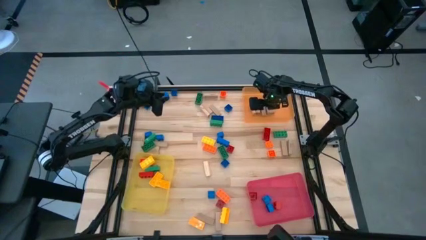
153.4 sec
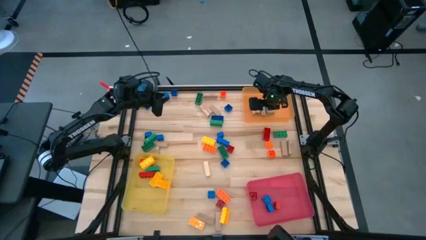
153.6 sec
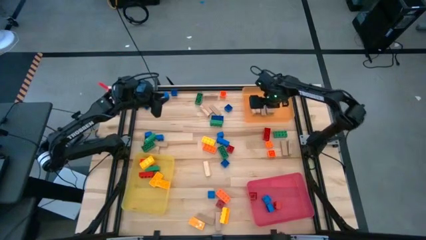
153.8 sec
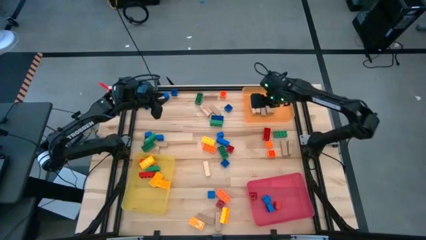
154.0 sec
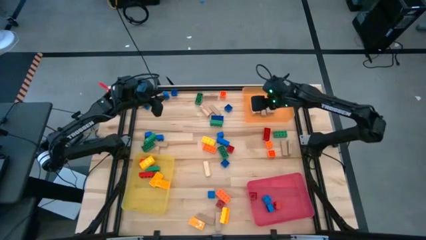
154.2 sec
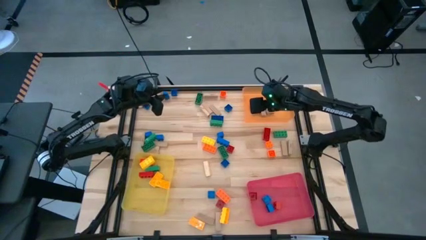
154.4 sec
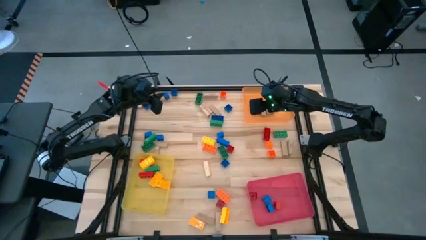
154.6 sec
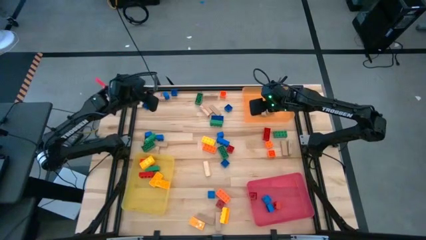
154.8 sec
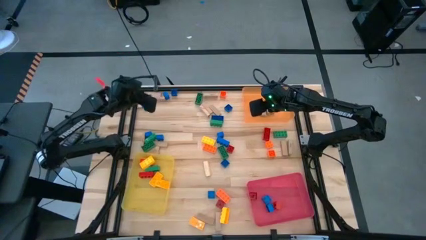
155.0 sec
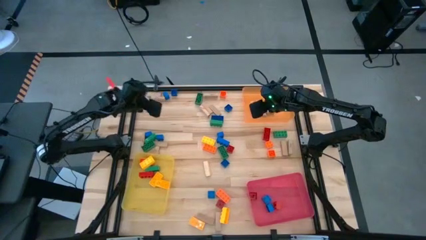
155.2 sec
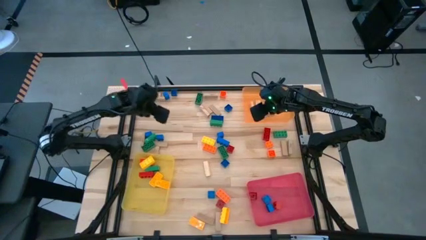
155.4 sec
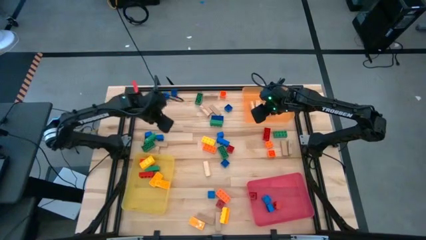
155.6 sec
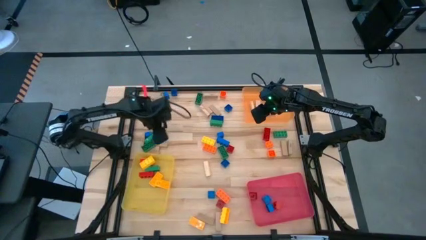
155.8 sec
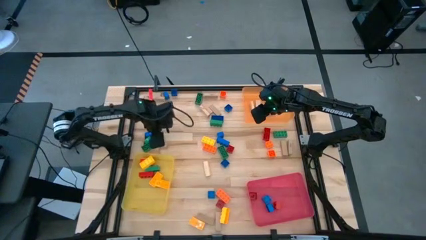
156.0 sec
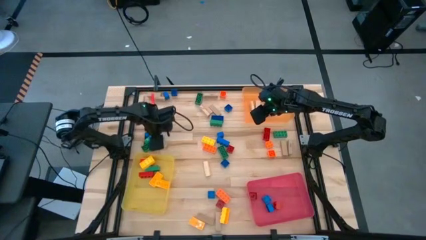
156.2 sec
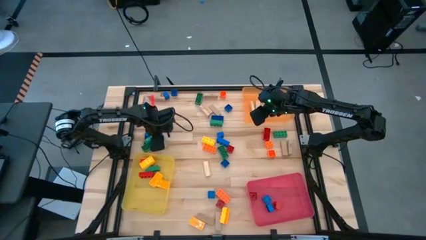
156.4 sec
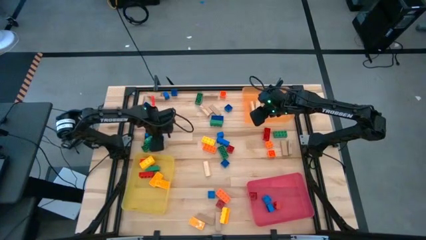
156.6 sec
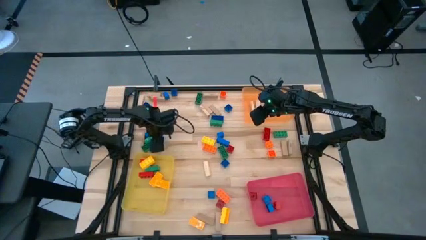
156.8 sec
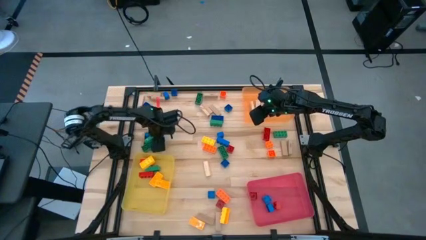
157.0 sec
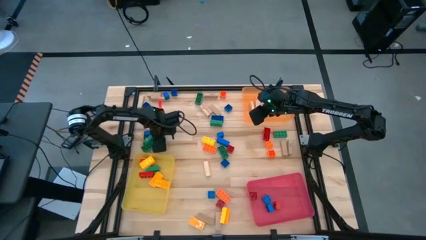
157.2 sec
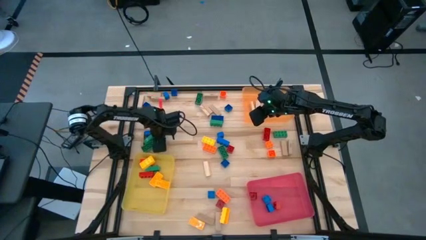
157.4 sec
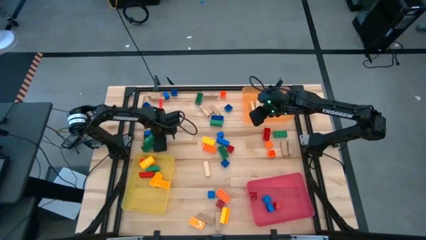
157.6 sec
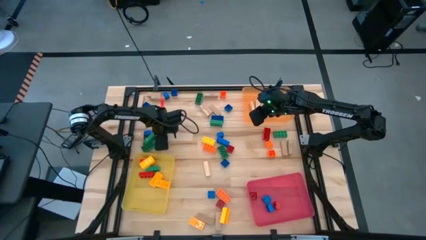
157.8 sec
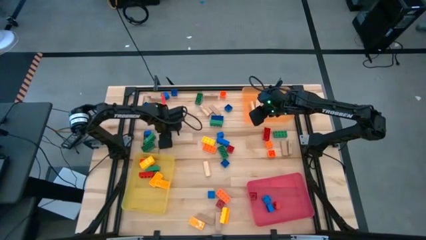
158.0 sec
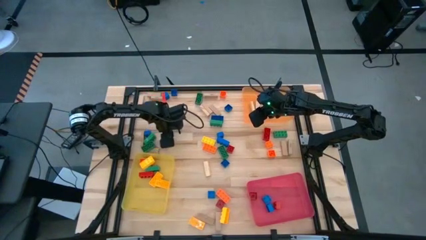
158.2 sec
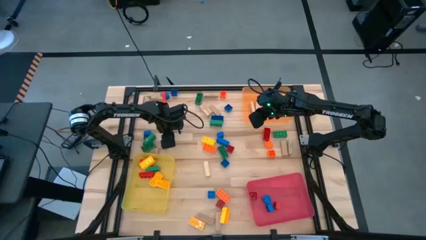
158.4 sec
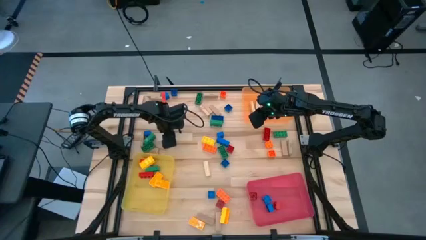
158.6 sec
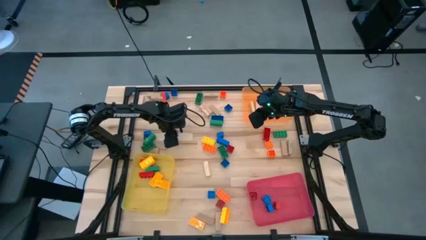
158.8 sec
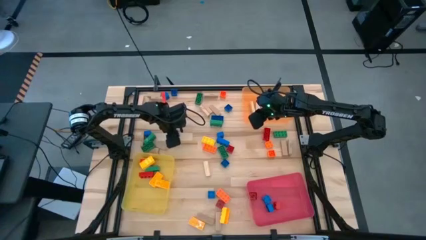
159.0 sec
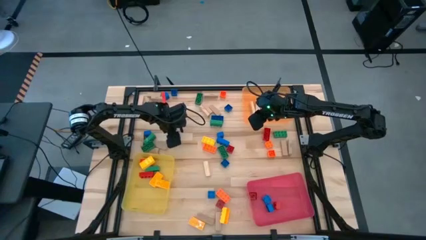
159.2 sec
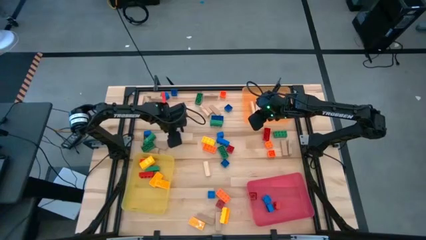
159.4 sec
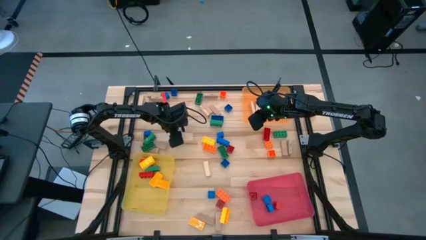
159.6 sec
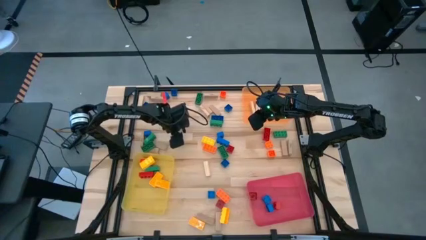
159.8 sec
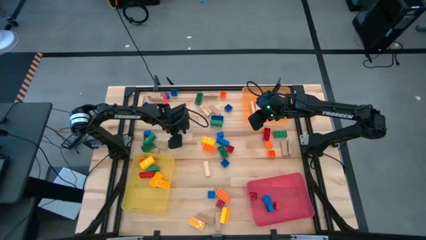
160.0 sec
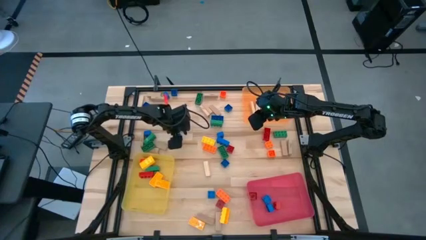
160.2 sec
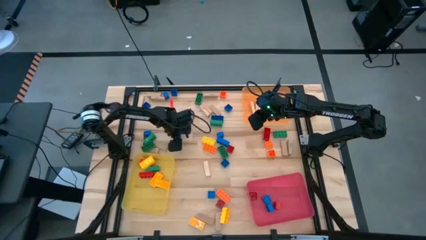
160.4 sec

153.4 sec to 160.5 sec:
Task: Sort blocks by size
Put the small blue game piece into the red bin

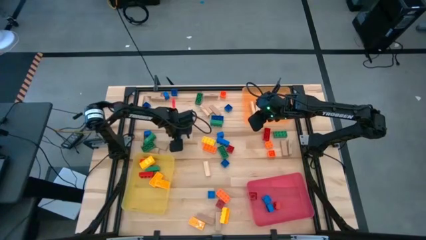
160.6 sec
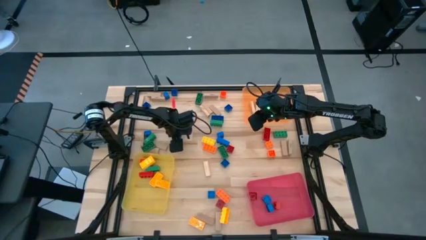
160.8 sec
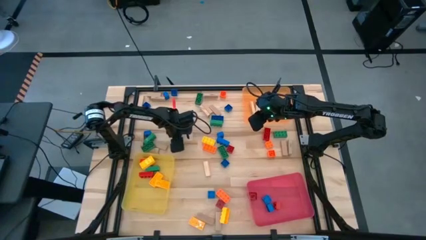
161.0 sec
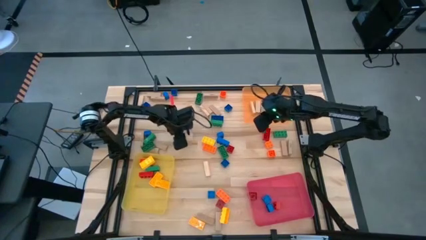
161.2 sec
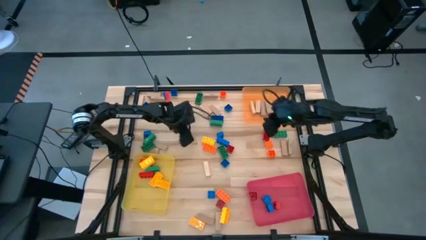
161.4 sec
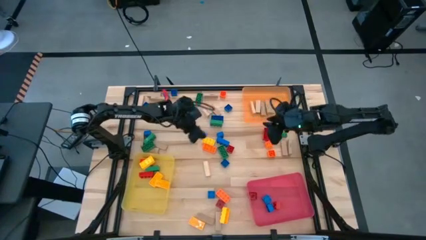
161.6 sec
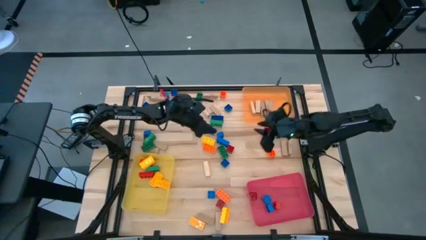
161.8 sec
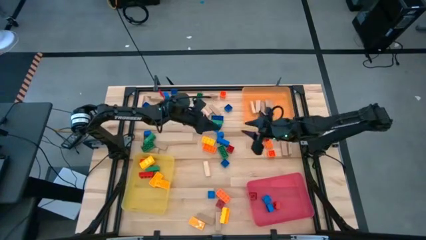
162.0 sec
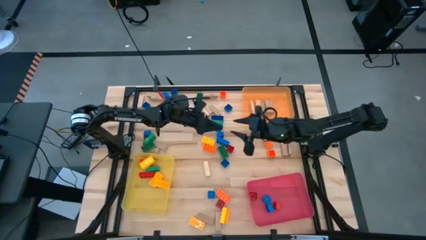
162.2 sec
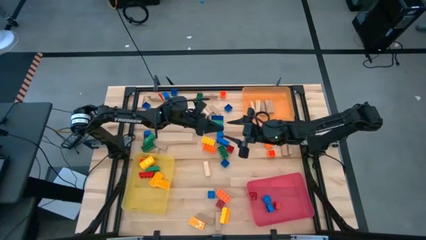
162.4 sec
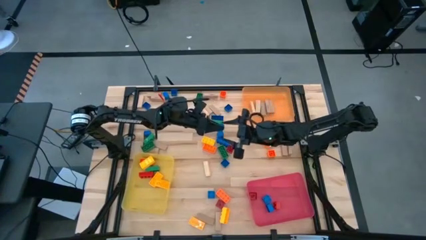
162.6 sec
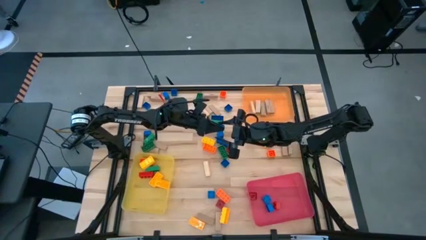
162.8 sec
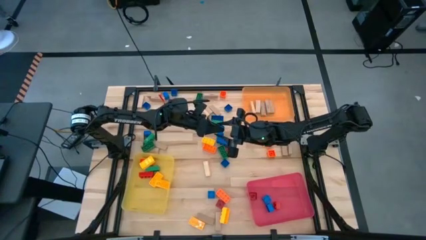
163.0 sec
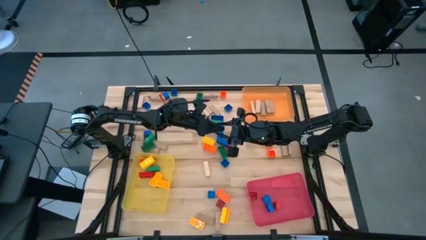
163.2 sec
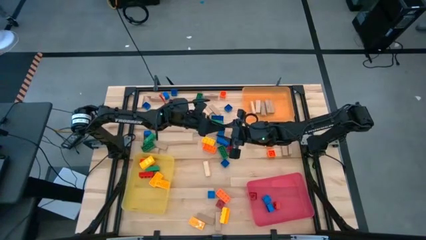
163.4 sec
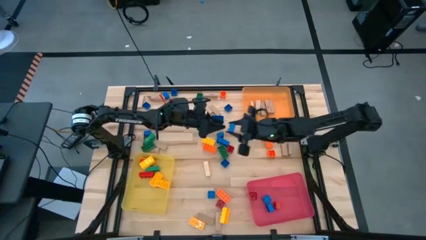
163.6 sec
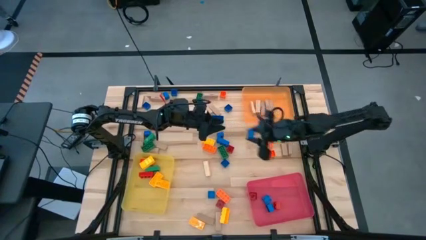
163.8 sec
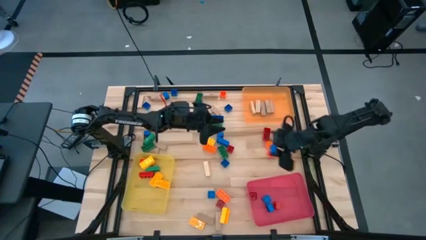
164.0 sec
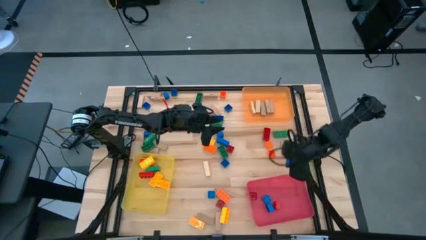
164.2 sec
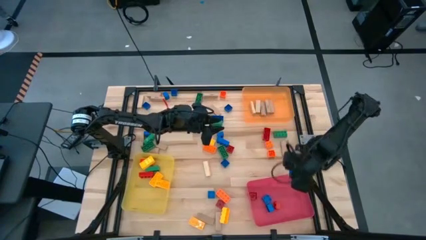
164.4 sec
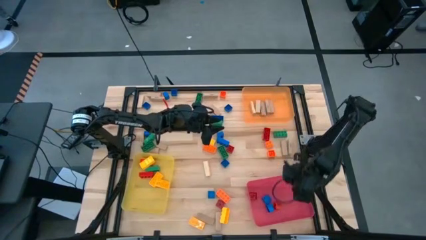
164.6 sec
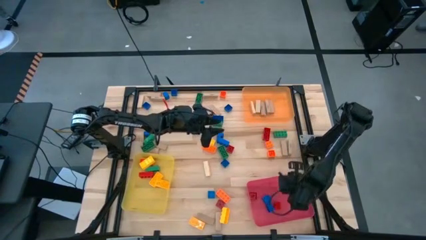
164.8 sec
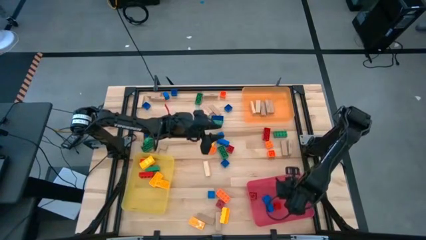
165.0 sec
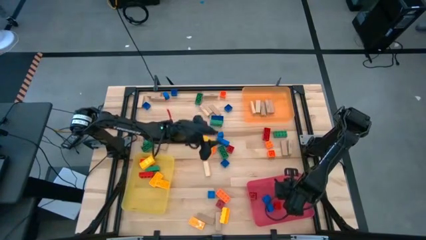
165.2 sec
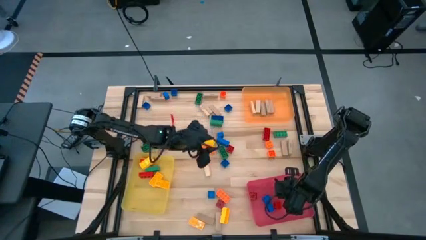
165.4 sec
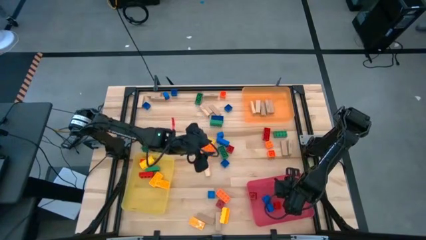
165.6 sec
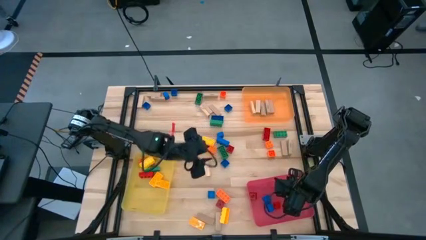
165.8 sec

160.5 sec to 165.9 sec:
Put the small blue game piece into the red bin

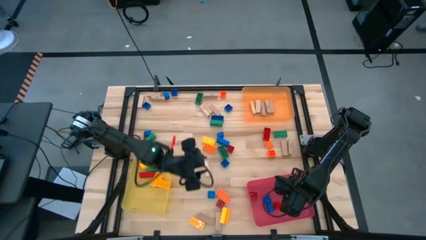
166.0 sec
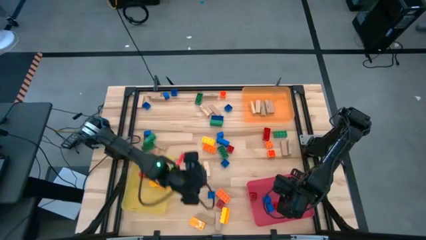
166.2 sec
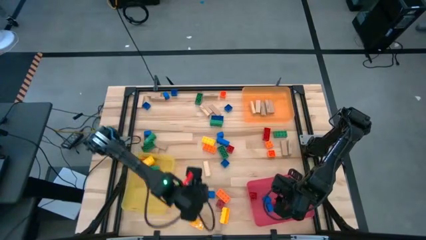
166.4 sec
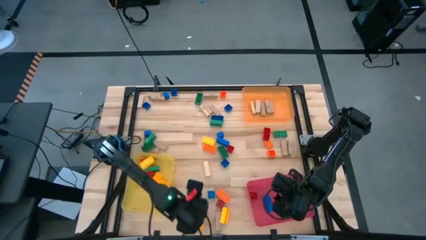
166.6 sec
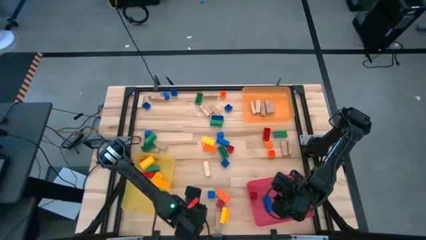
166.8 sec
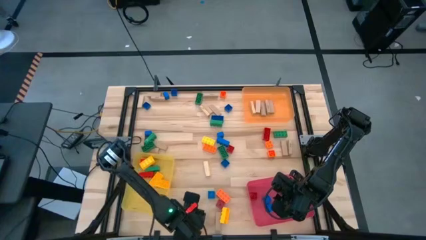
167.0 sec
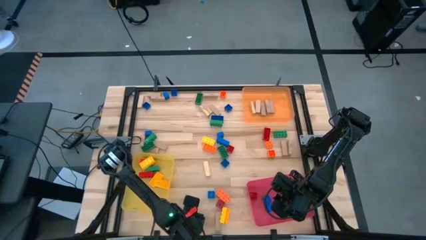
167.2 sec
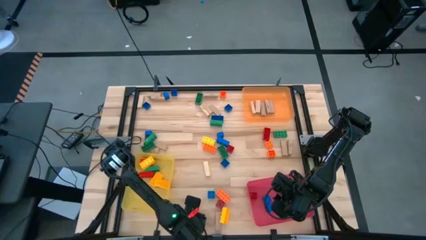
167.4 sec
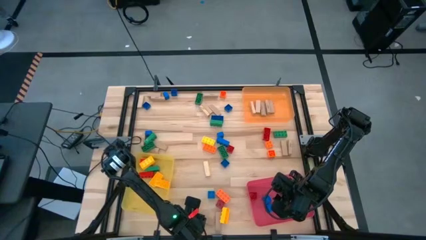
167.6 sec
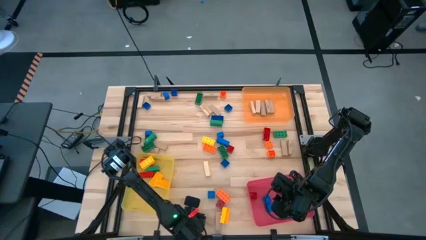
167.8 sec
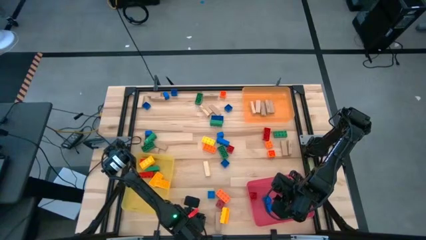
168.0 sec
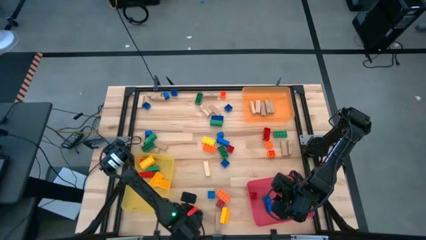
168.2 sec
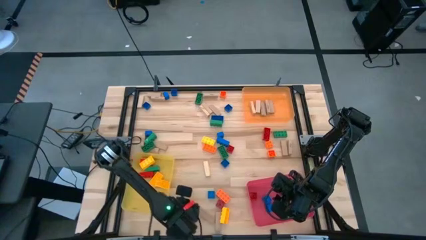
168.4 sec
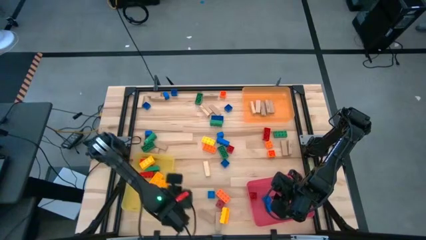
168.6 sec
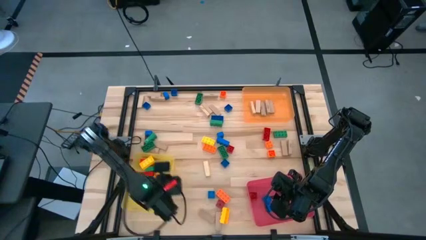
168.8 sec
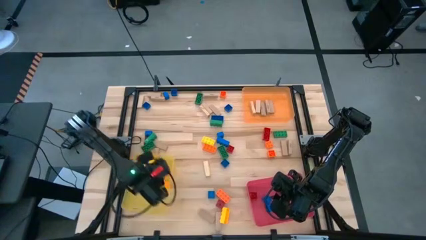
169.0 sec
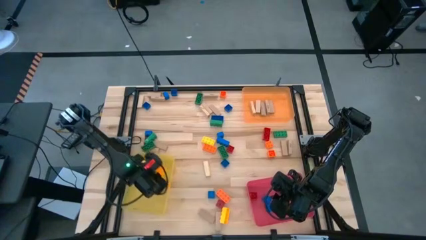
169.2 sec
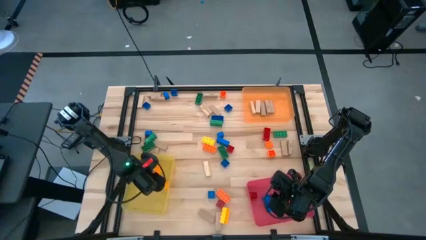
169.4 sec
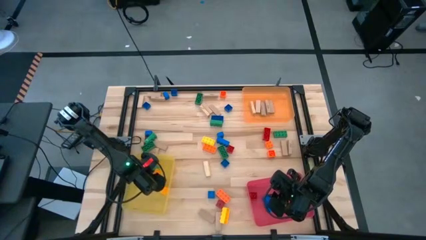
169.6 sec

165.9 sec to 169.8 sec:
Put the large yellow game piece into the yellow bin
